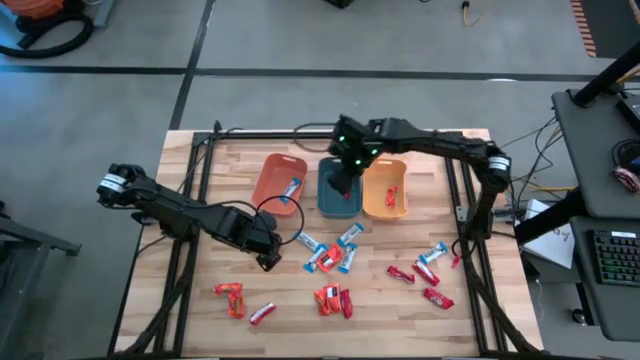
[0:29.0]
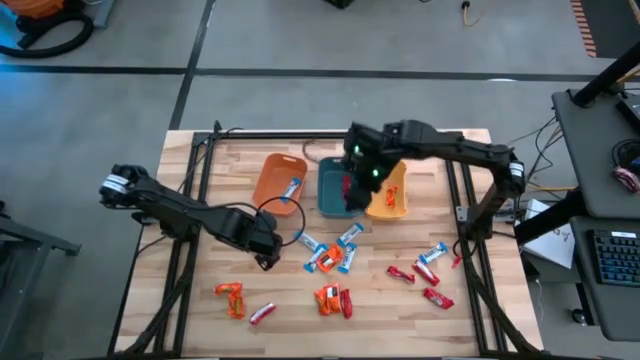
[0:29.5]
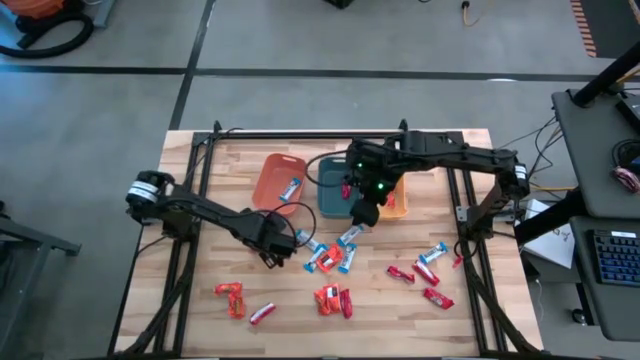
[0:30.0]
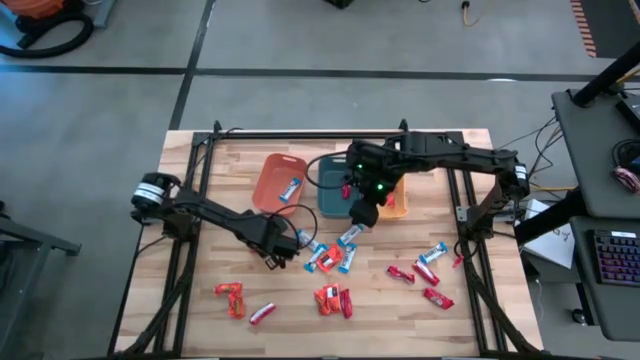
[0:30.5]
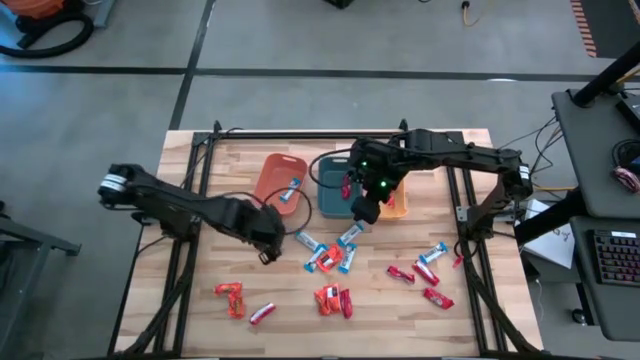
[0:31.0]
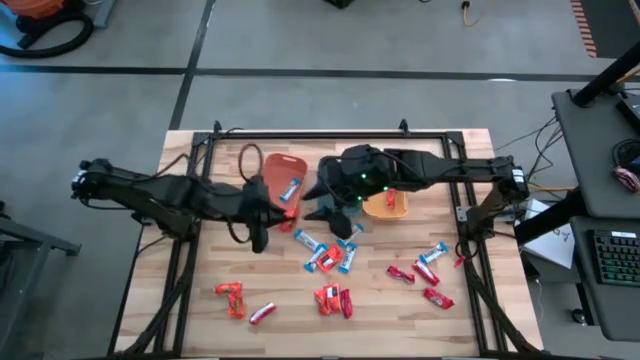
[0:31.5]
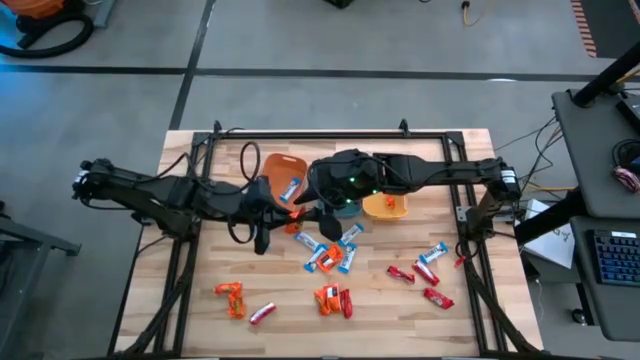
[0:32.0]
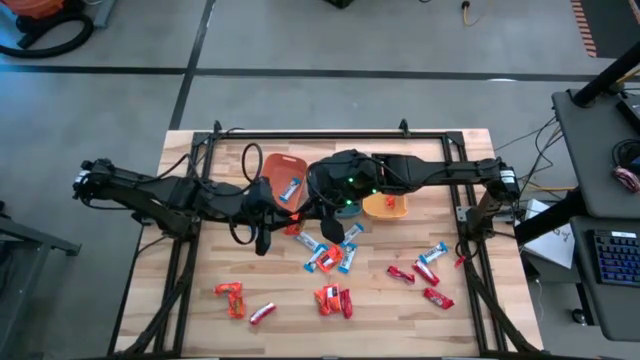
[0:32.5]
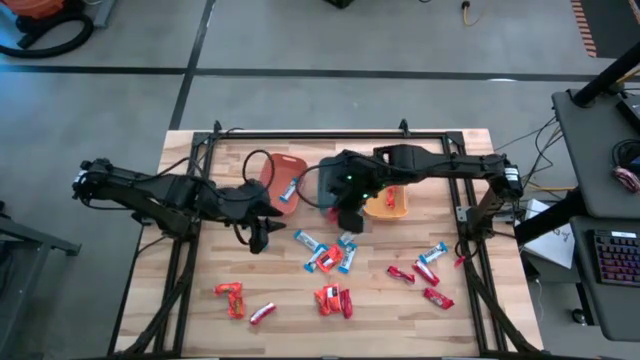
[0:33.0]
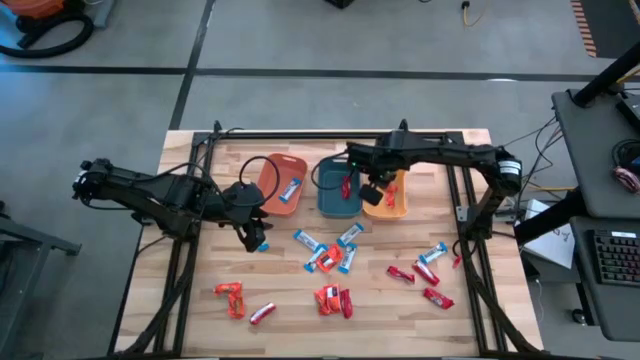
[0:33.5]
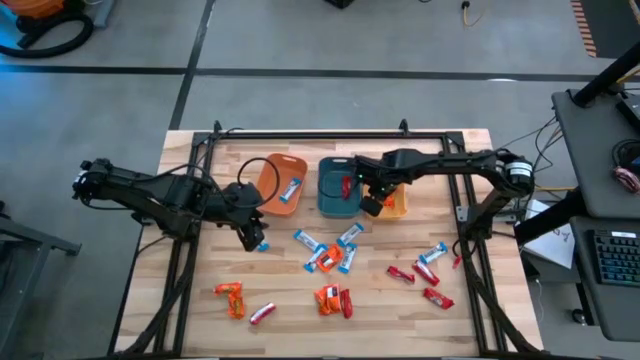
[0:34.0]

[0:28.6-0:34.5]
Task: Sort candy
Put the orange chocolate bar into the yellow bin

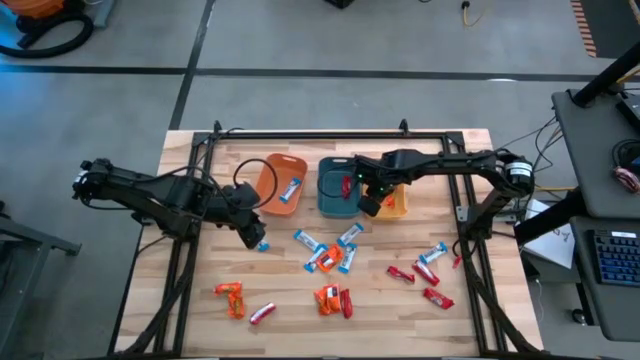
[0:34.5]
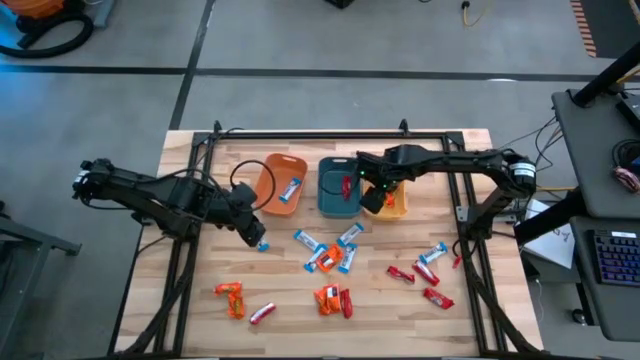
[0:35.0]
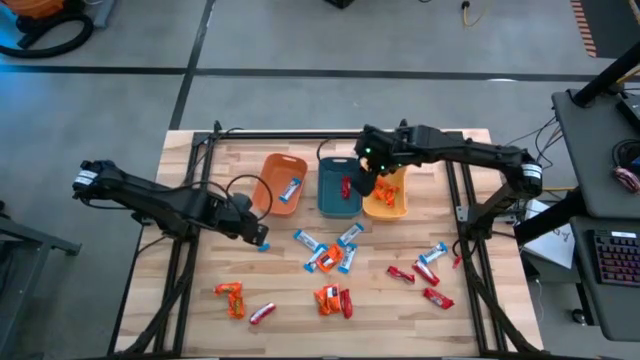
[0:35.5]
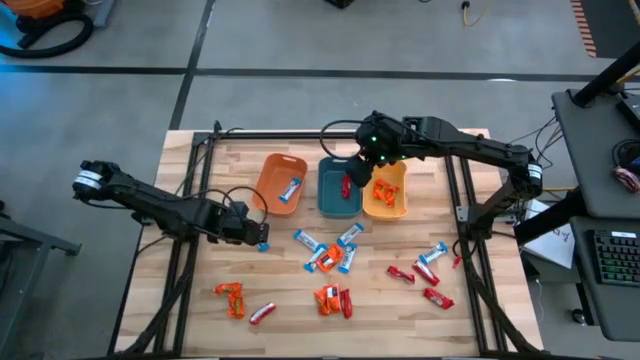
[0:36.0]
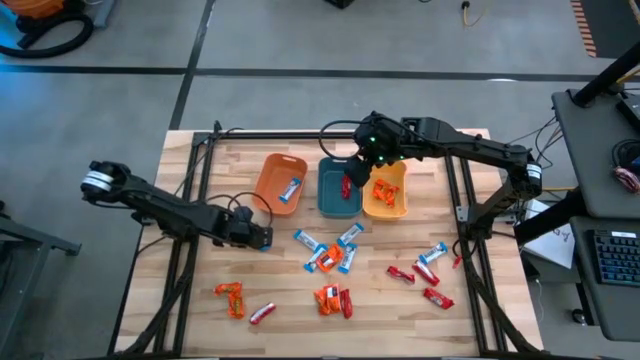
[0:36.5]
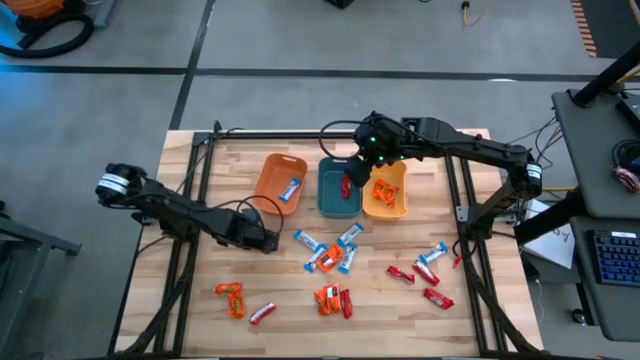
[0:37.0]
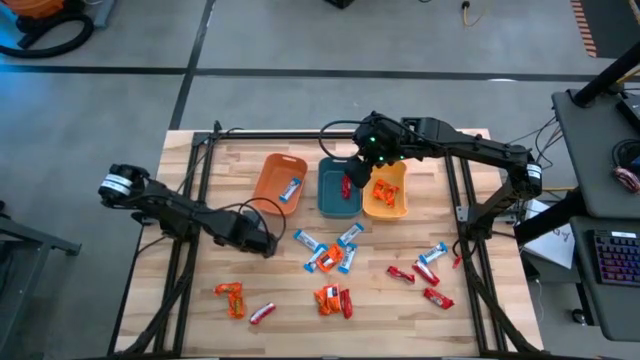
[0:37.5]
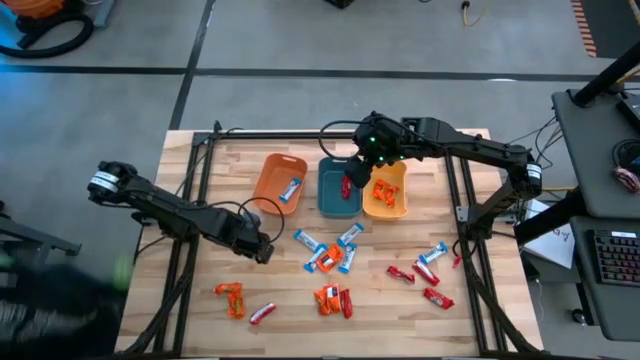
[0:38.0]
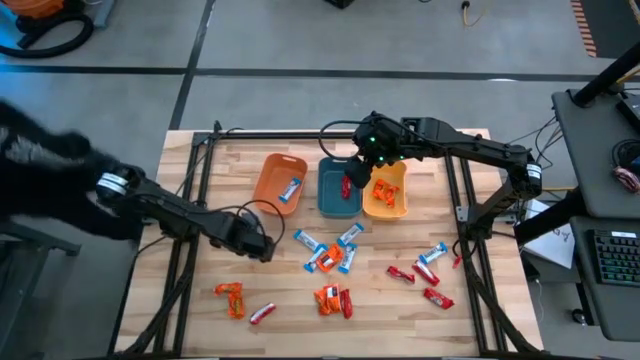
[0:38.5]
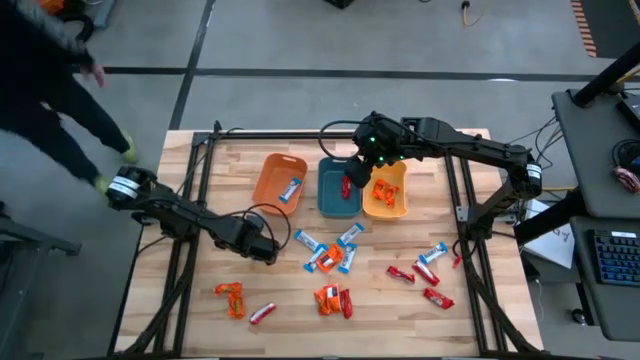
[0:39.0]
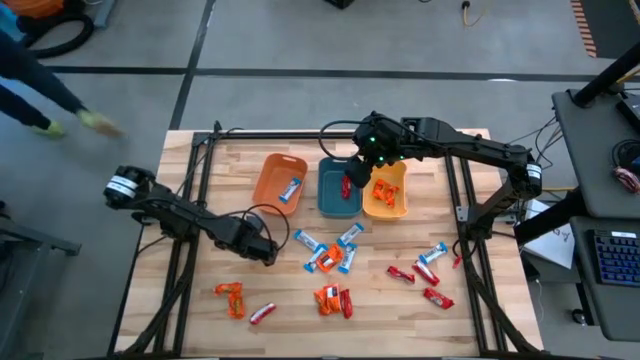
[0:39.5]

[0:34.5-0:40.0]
Put the white chocolate bar into the orange bin

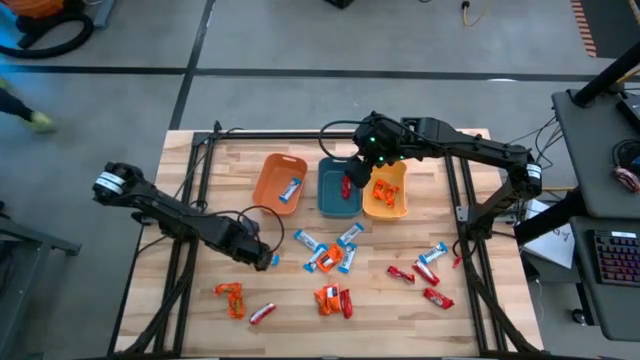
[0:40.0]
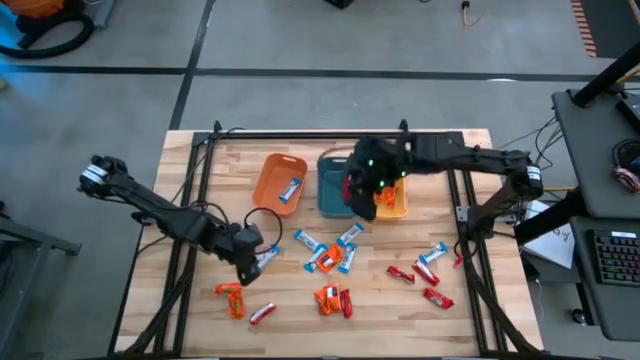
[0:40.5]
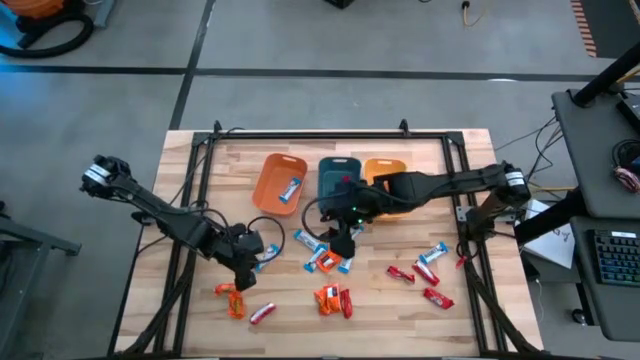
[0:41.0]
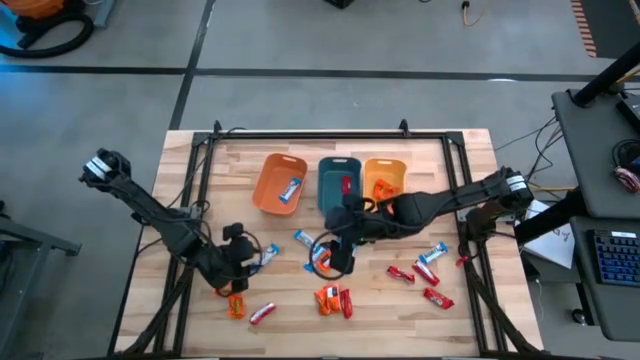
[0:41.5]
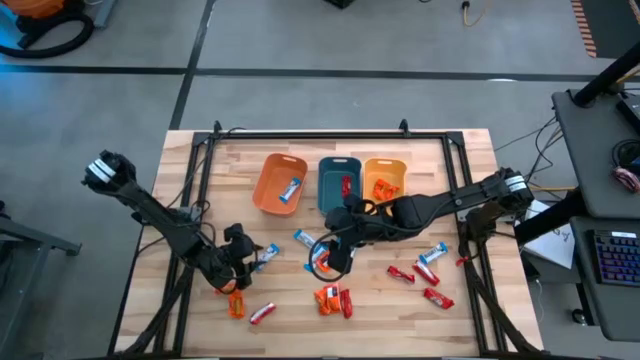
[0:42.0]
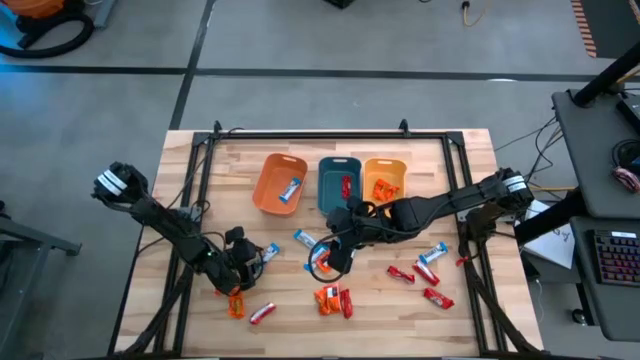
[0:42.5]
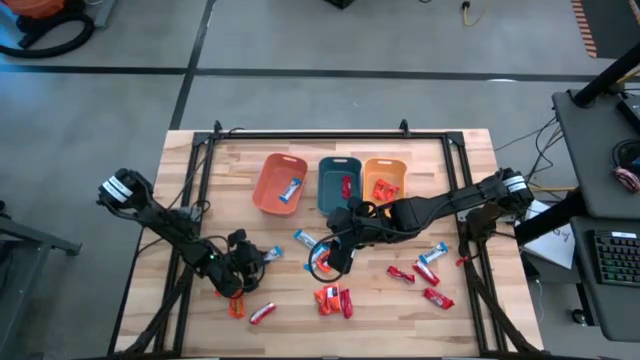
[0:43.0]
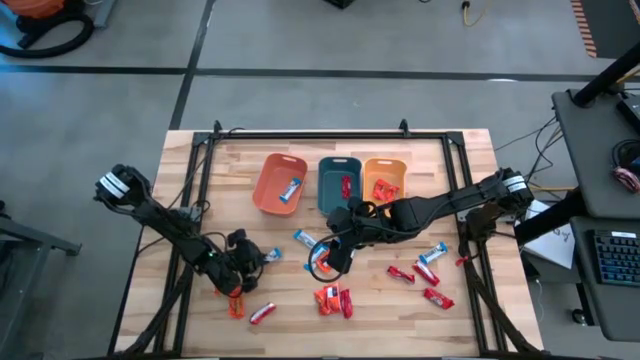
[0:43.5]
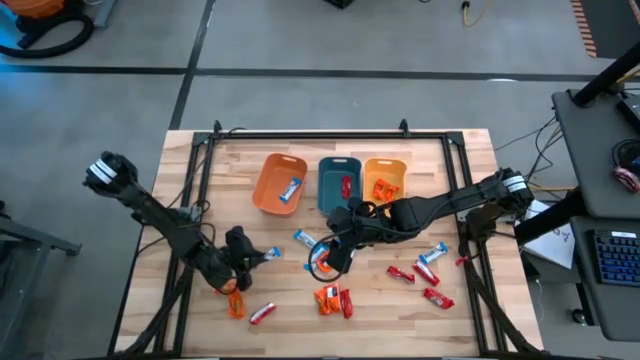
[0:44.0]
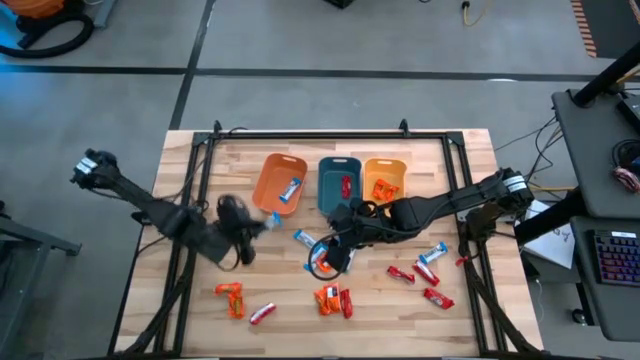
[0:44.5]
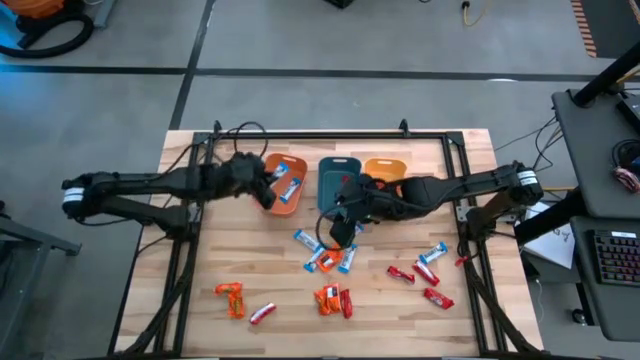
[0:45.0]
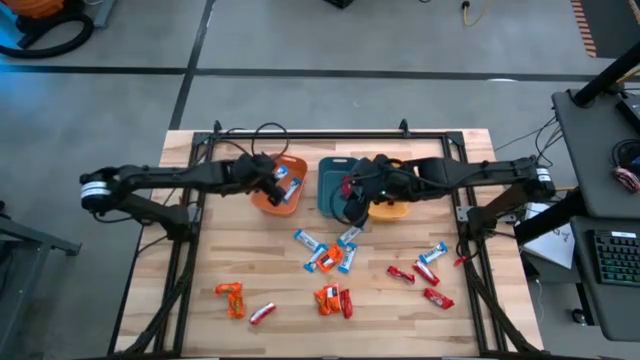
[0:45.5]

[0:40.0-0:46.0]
Put the white chocolate bar into the orange bin

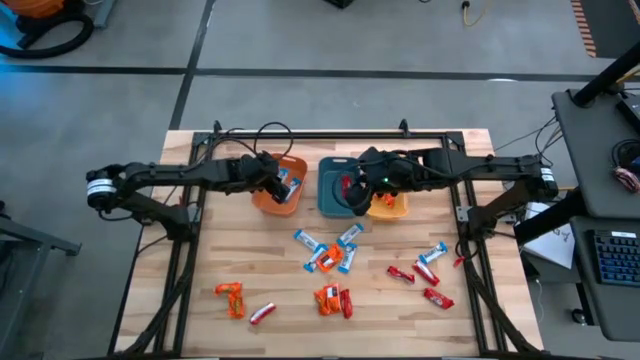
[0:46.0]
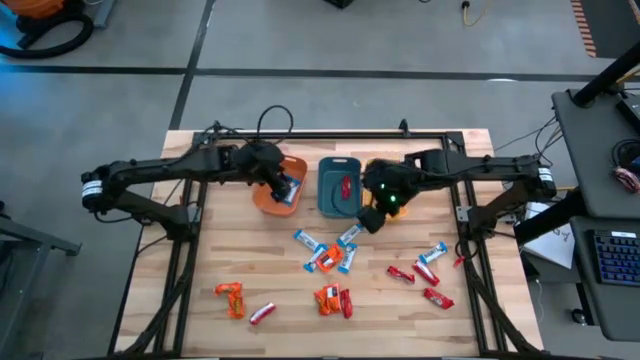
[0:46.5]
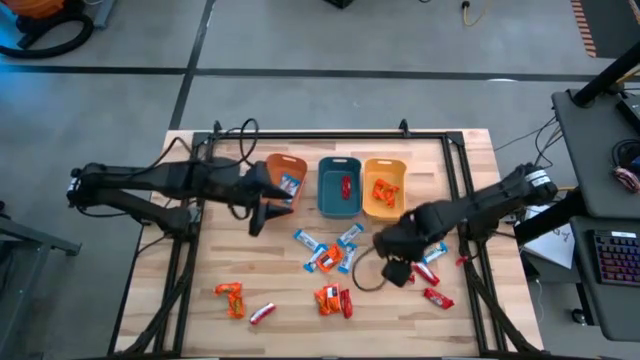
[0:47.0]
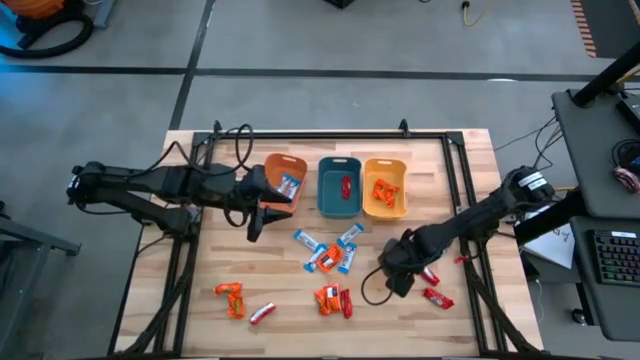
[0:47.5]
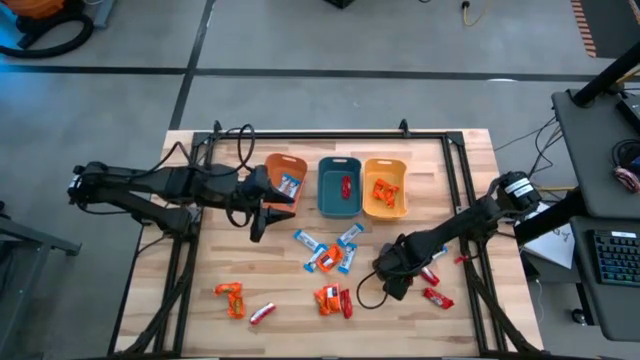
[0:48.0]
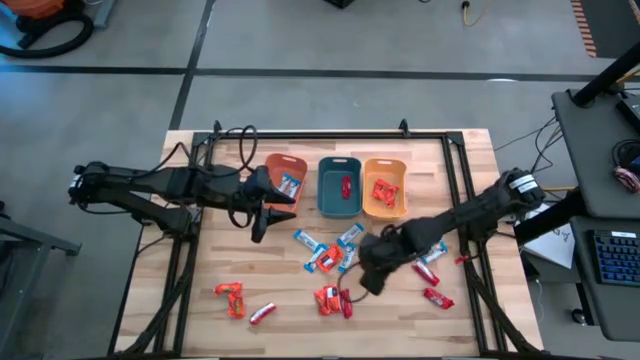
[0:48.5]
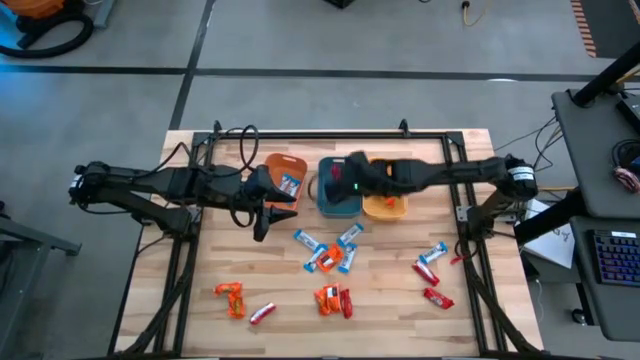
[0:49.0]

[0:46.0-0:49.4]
Put the red chocolate bar into the blue bin
